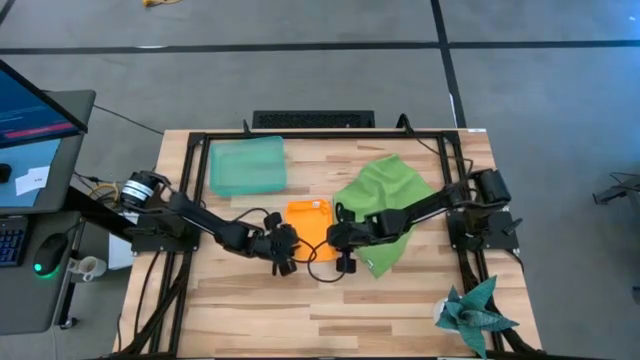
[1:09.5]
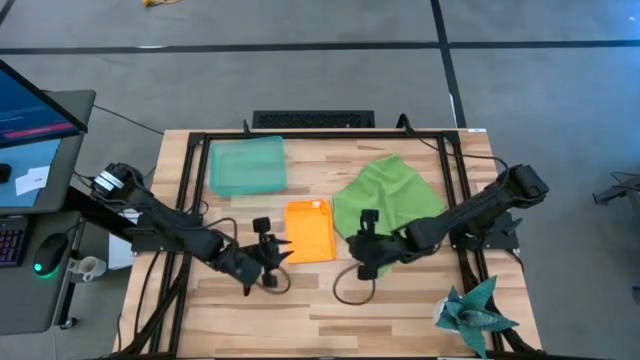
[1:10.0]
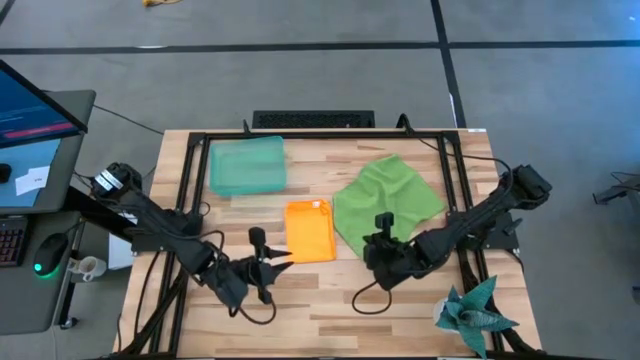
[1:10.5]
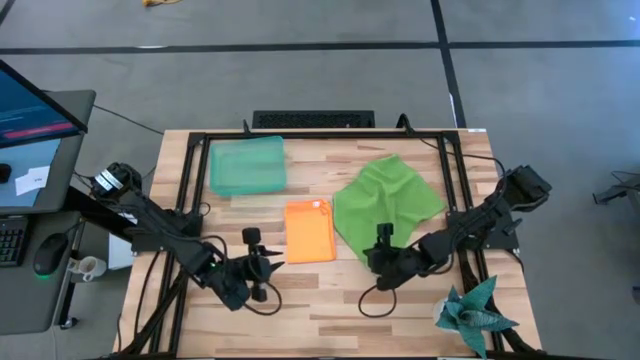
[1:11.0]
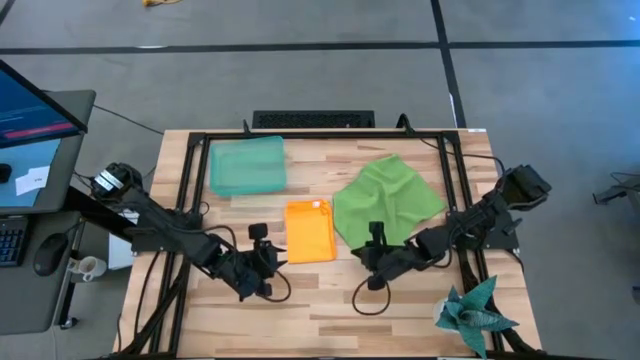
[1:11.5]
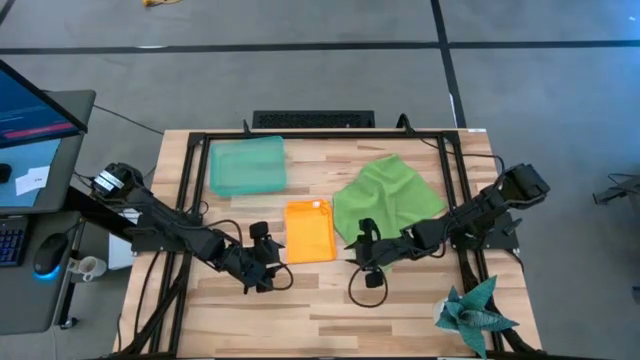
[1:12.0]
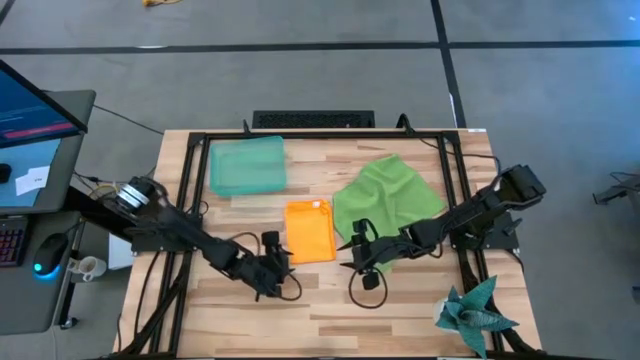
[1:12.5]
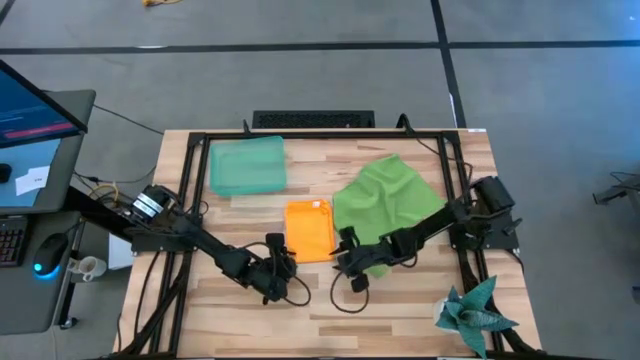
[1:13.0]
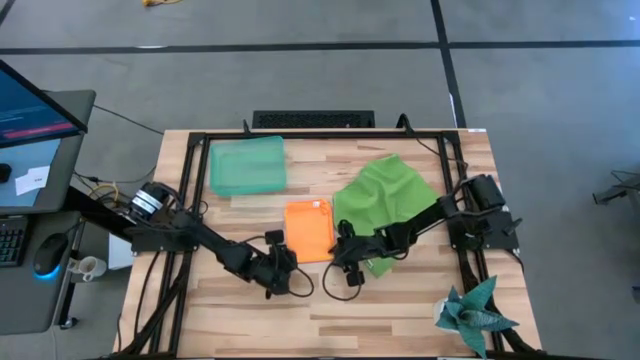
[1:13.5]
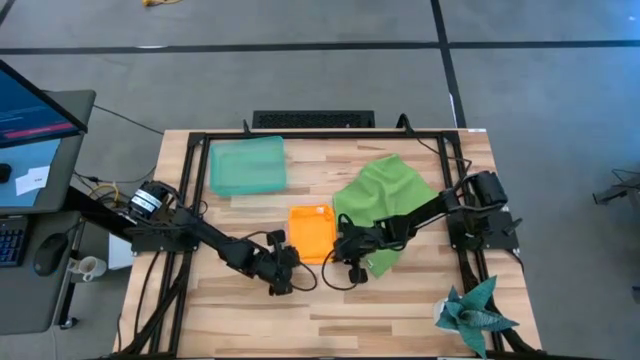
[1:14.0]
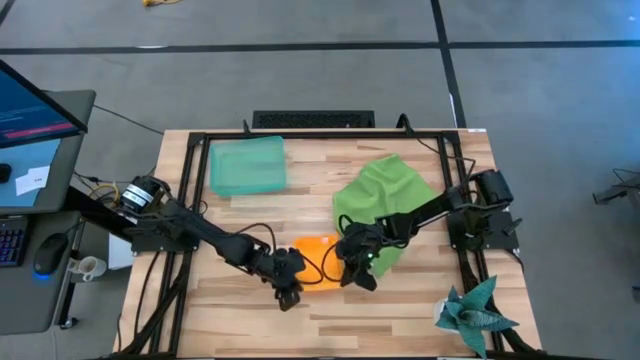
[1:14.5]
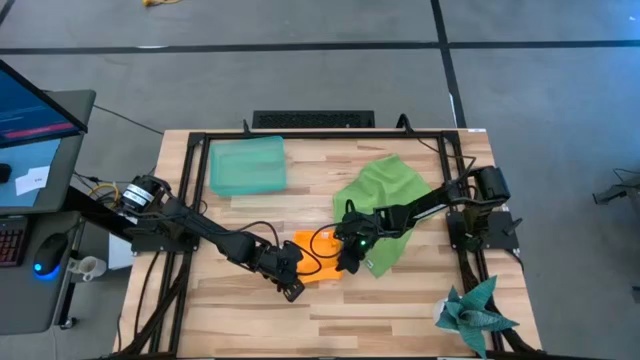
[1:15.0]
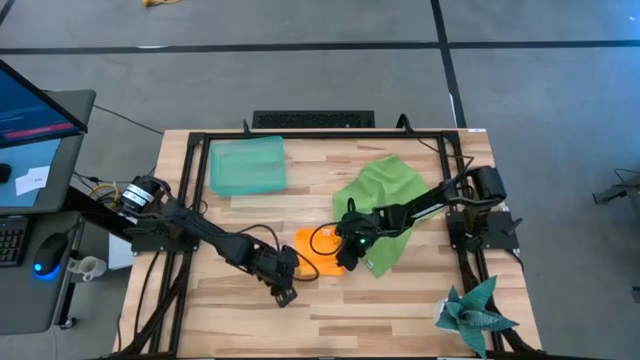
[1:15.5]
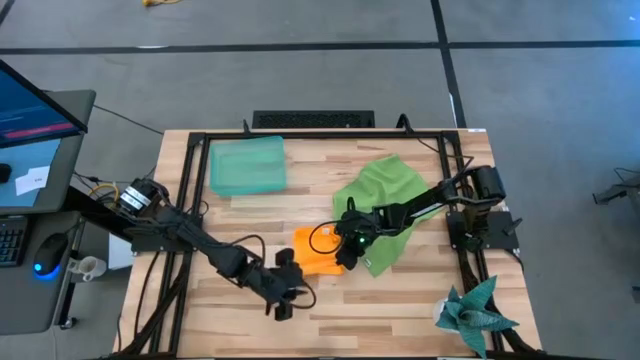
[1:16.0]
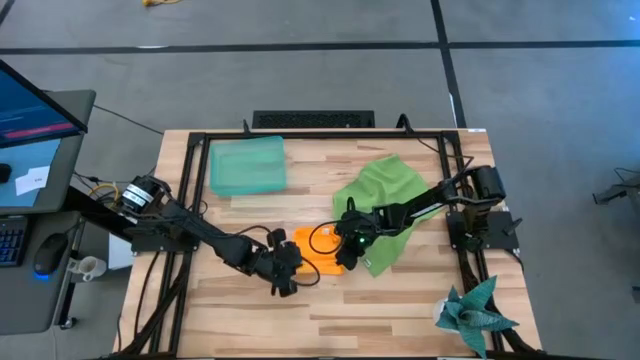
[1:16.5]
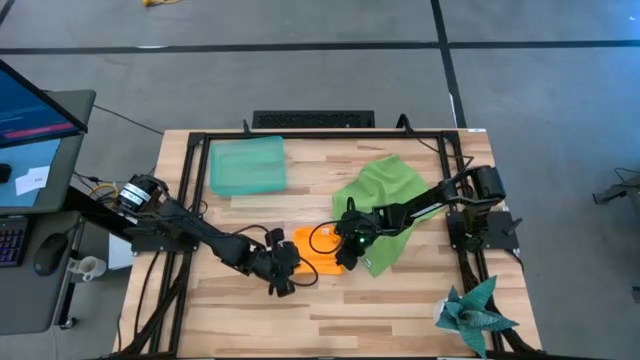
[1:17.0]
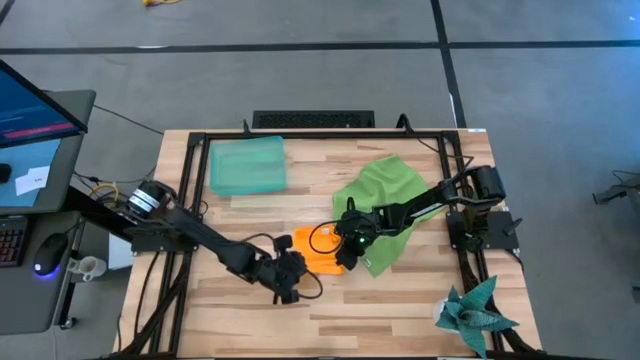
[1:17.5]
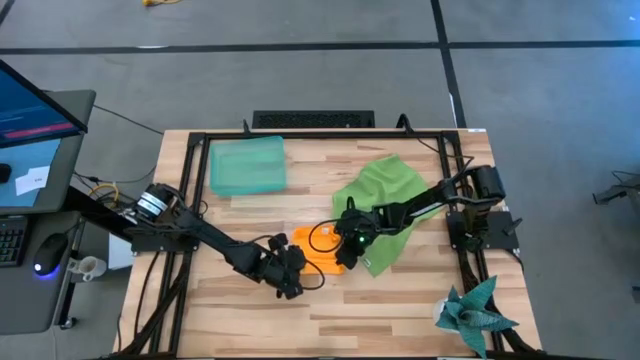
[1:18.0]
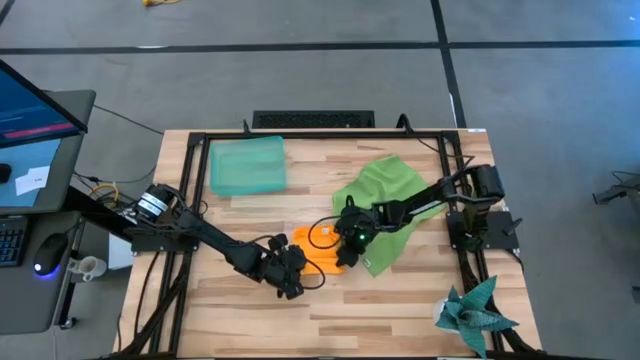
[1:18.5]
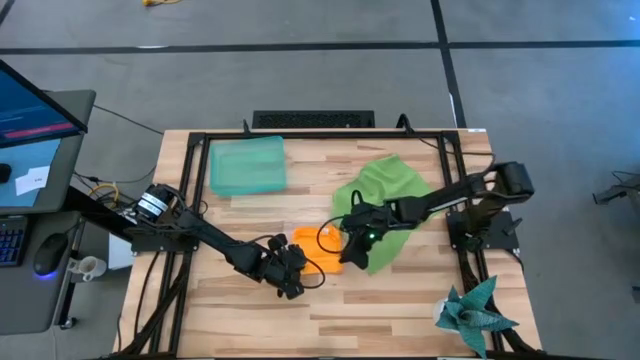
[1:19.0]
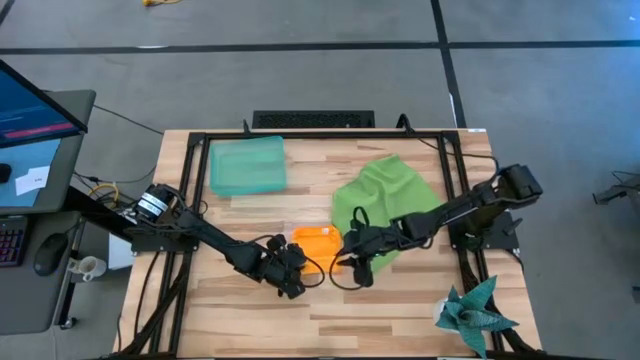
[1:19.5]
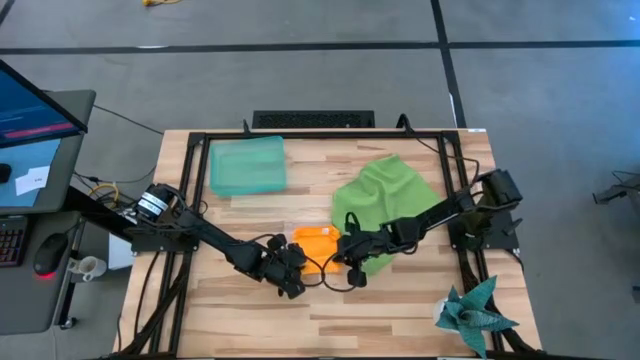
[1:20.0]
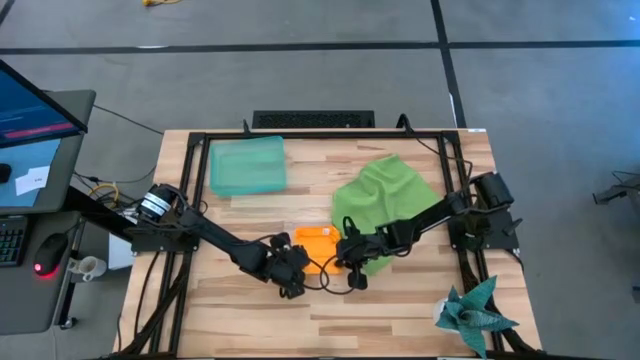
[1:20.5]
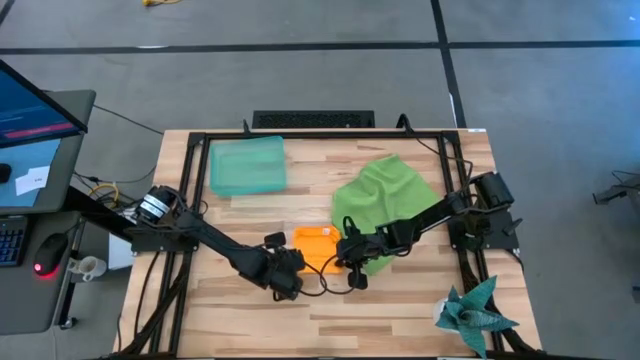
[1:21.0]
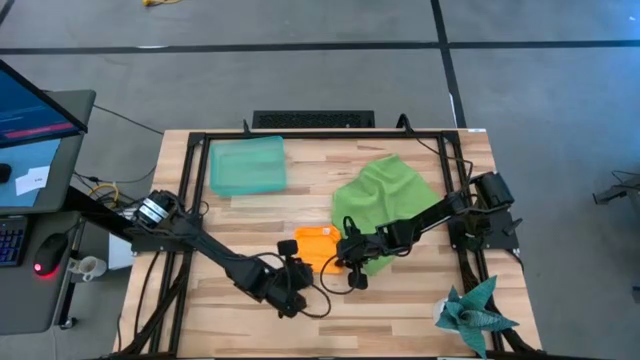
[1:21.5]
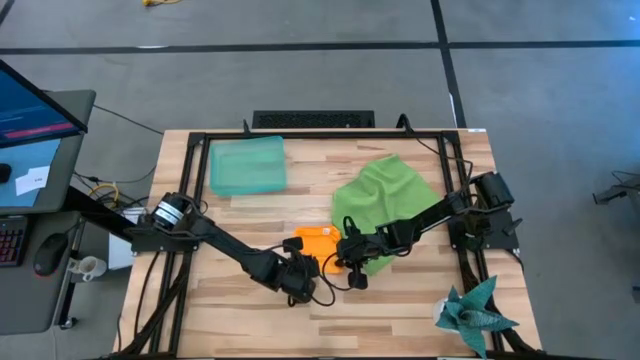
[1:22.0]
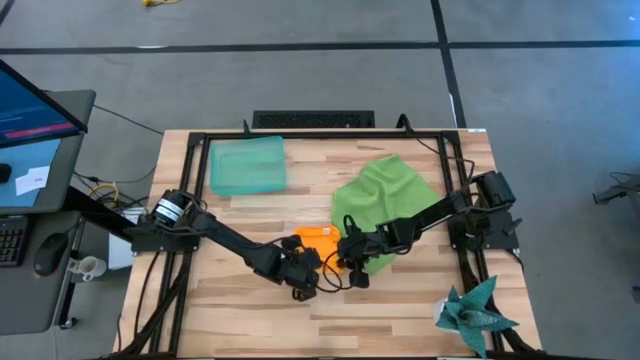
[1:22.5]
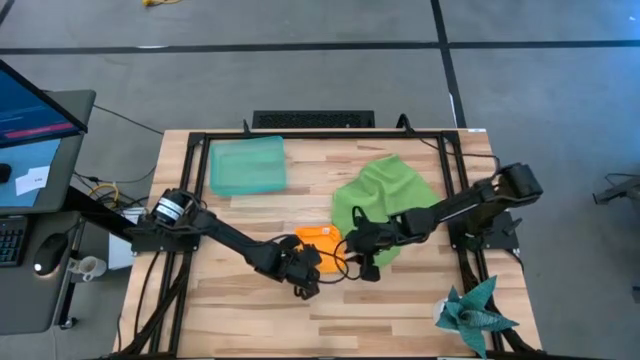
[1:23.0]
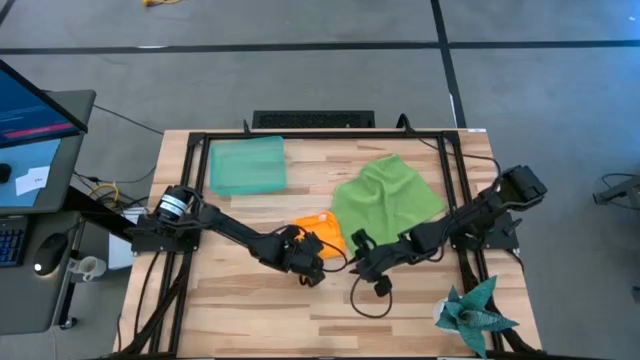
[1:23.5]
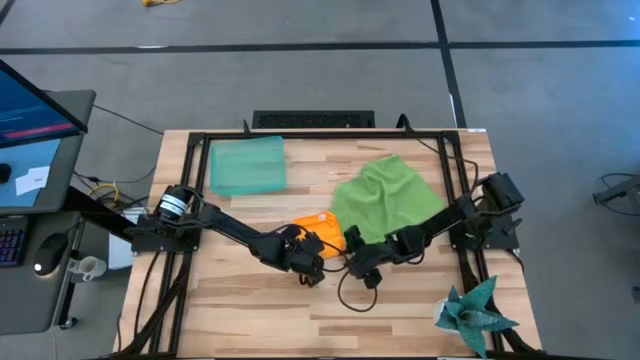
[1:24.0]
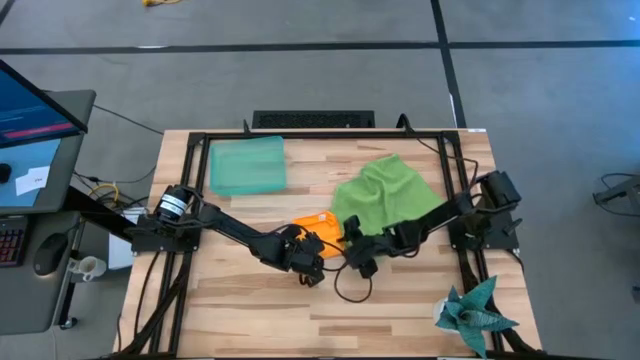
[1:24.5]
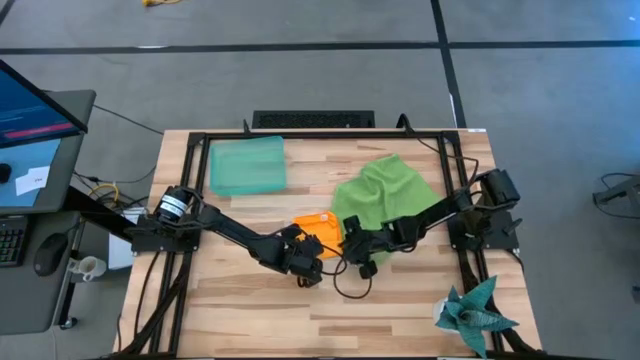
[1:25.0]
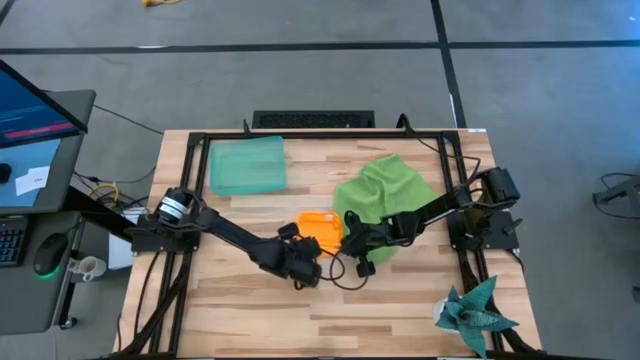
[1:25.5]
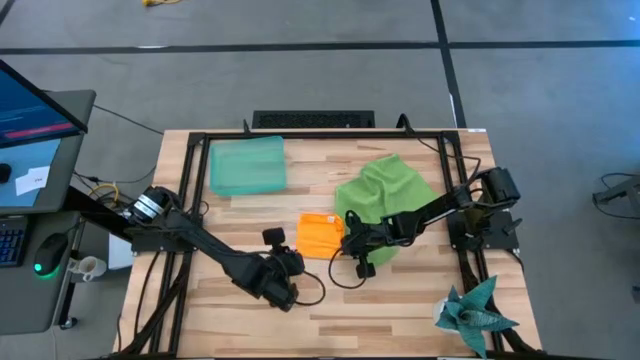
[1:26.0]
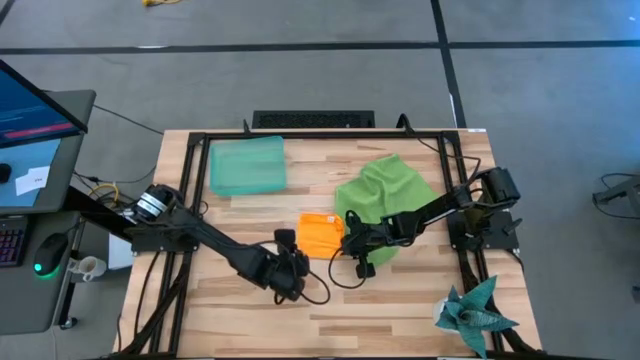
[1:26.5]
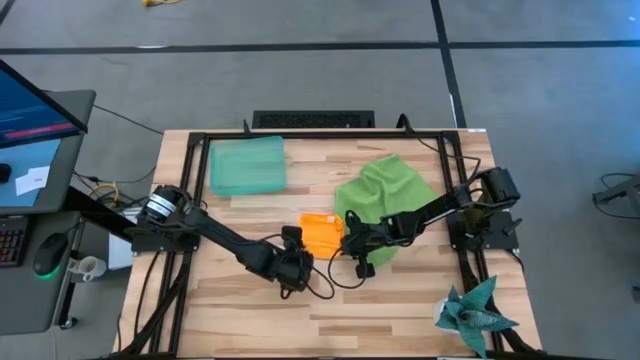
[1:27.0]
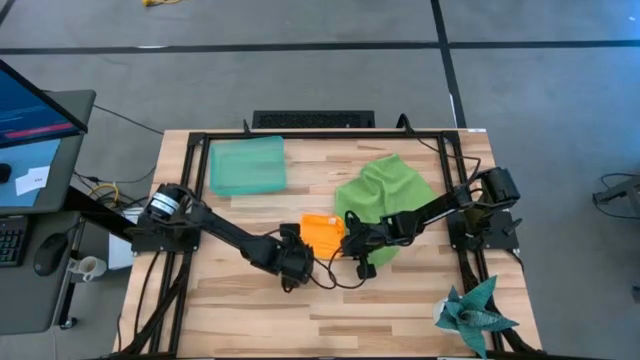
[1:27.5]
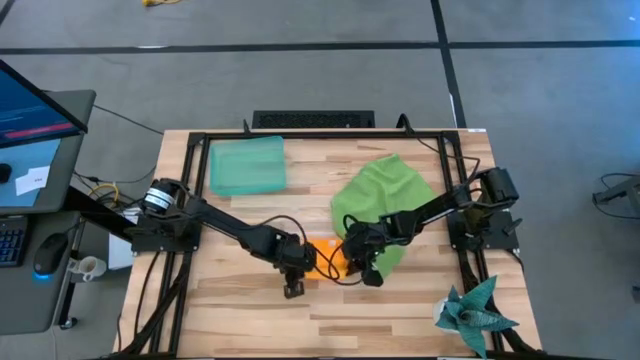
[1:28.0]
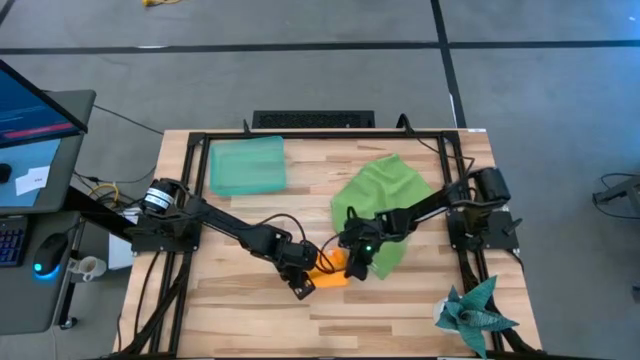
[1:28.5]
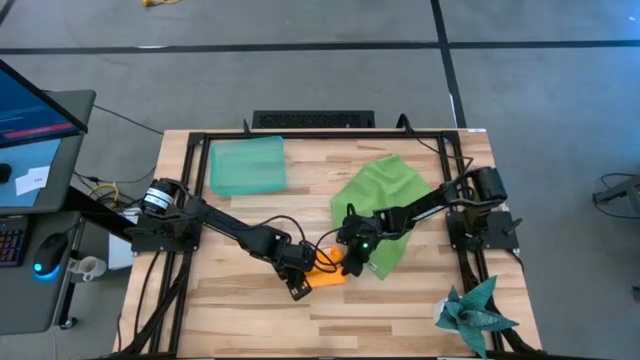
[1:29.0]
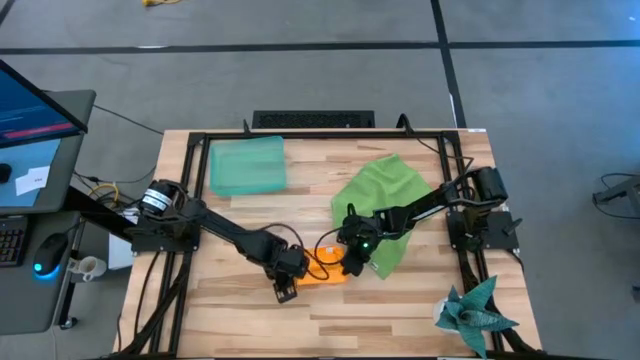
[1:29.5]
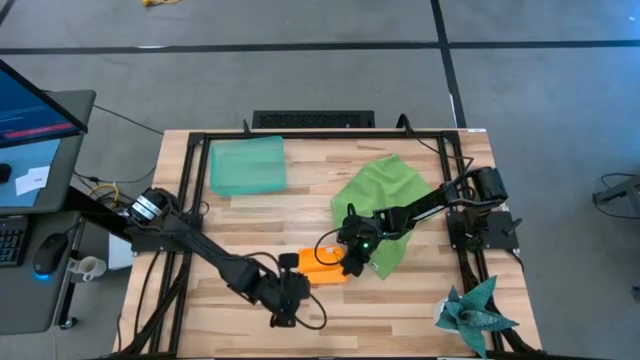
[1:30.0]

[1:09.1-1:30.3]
Task: Roll microfiber towels into tight, uniform cylinder then place into a basket
Roll the yellow microfiber cloth
